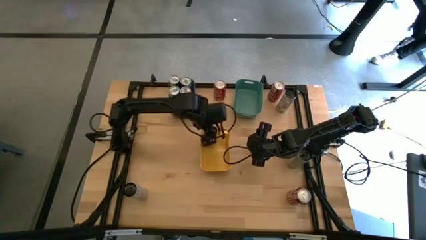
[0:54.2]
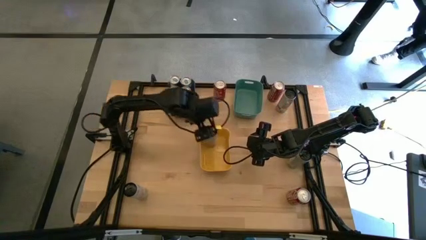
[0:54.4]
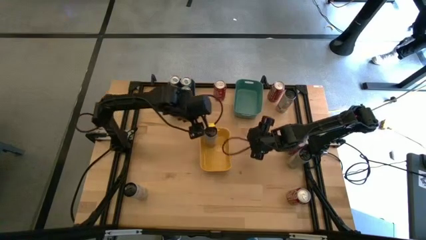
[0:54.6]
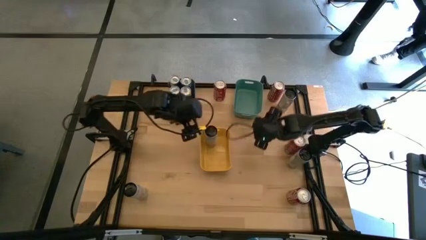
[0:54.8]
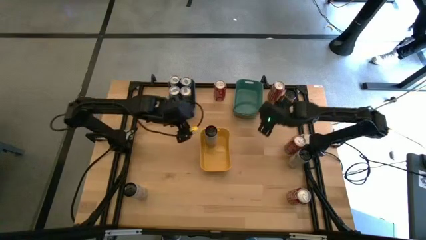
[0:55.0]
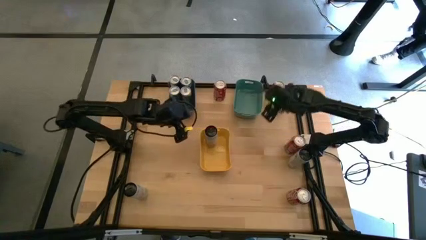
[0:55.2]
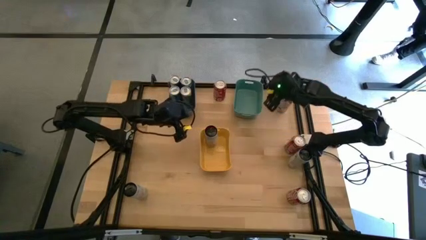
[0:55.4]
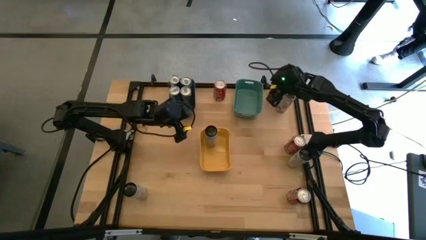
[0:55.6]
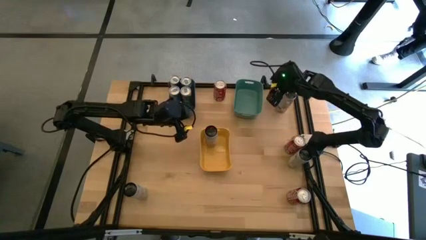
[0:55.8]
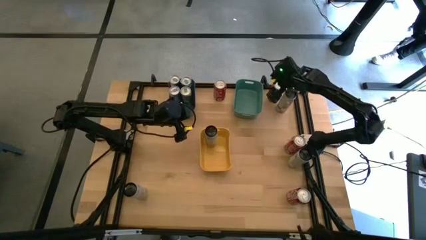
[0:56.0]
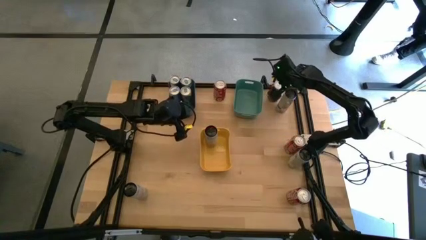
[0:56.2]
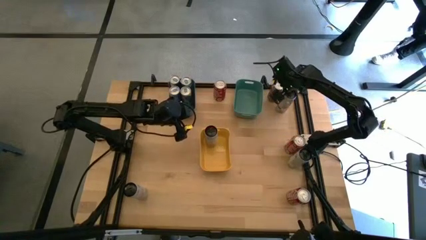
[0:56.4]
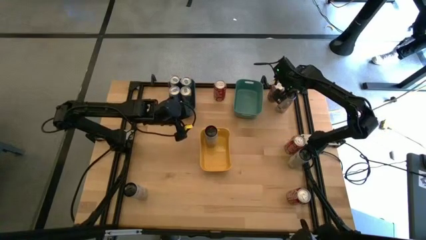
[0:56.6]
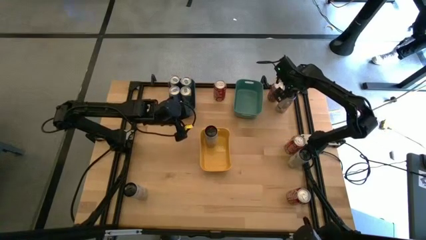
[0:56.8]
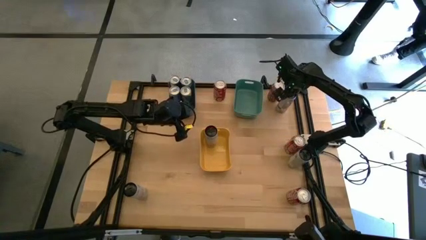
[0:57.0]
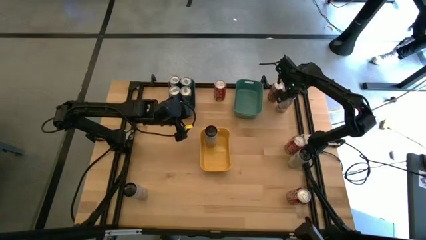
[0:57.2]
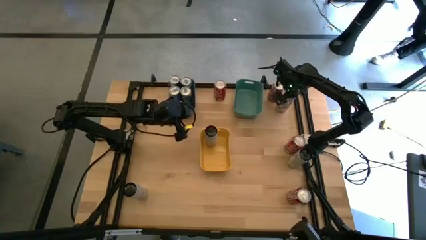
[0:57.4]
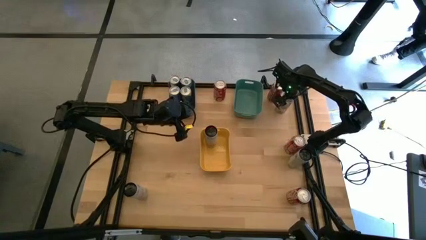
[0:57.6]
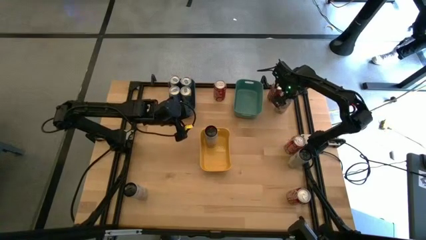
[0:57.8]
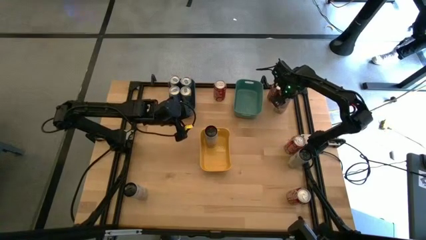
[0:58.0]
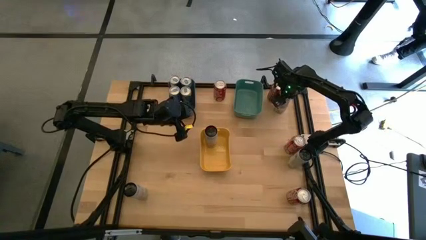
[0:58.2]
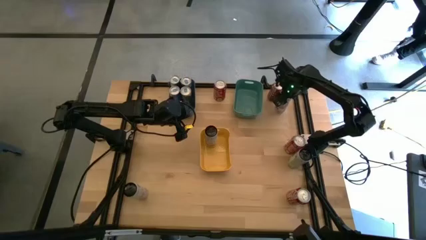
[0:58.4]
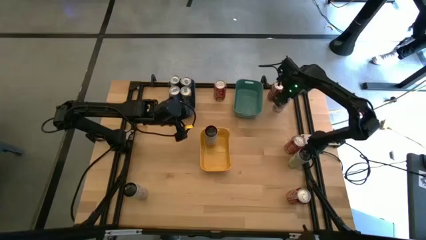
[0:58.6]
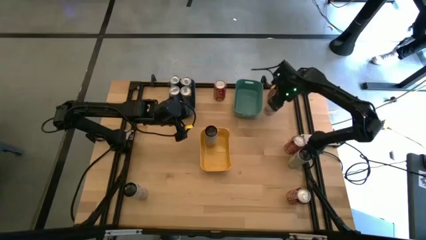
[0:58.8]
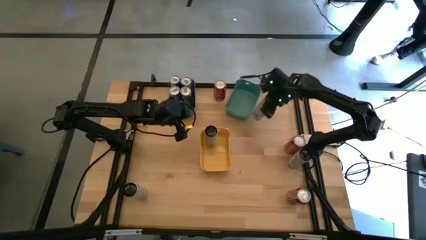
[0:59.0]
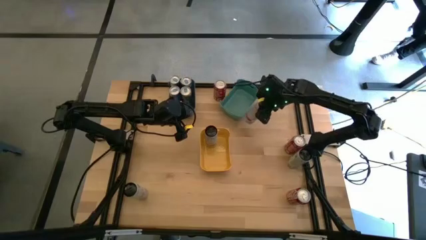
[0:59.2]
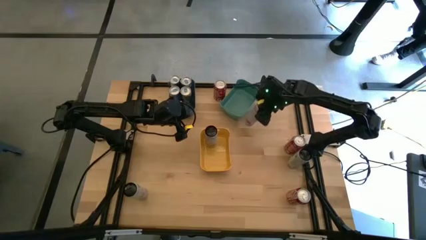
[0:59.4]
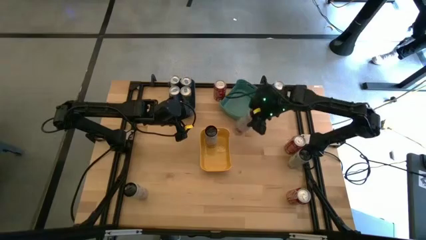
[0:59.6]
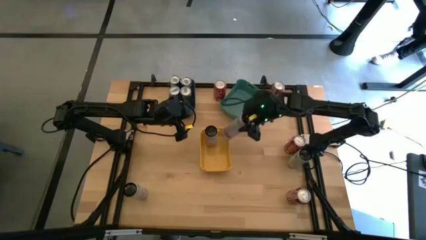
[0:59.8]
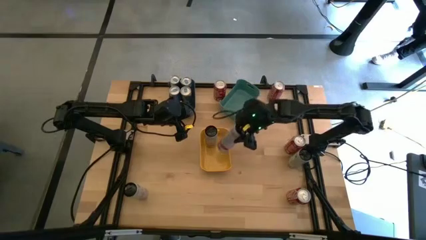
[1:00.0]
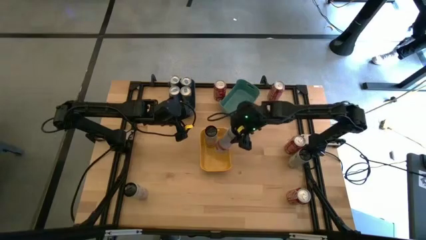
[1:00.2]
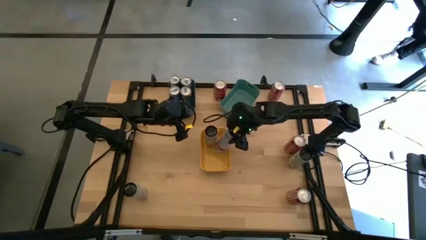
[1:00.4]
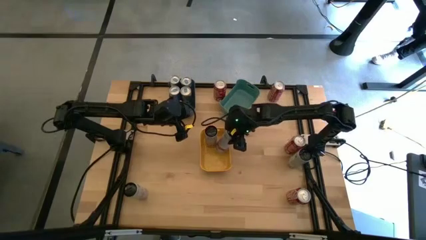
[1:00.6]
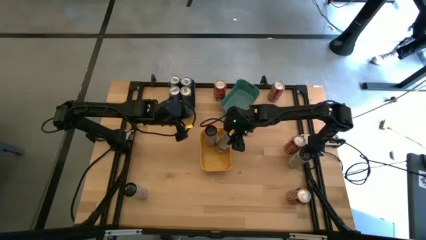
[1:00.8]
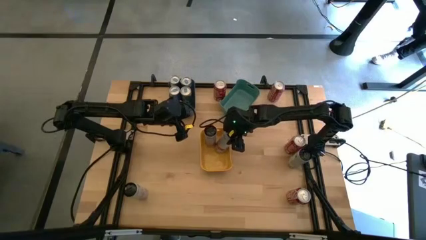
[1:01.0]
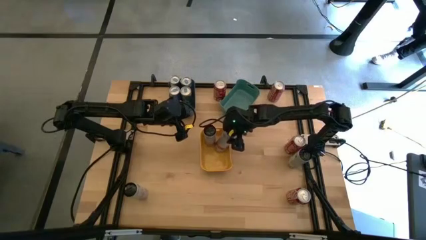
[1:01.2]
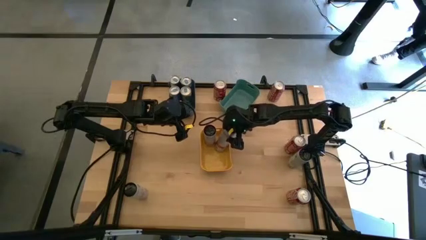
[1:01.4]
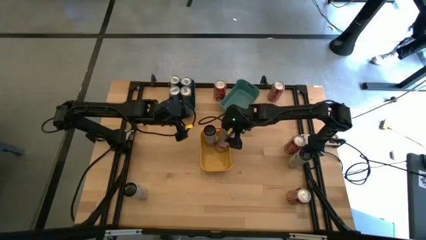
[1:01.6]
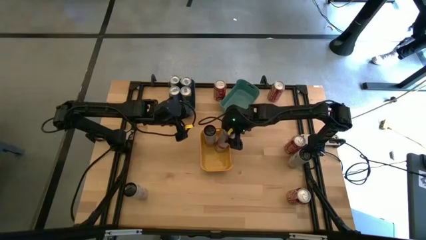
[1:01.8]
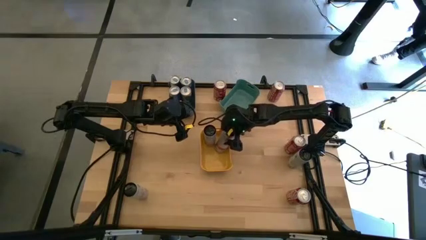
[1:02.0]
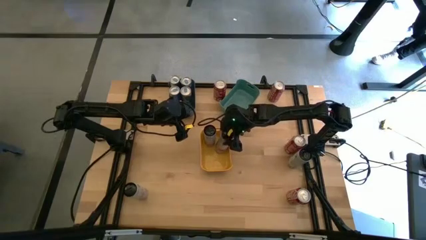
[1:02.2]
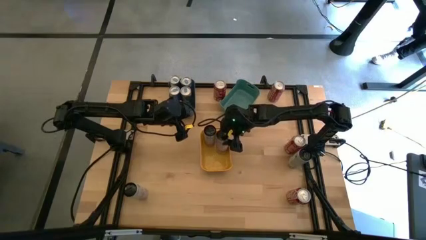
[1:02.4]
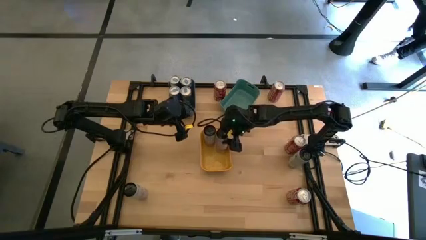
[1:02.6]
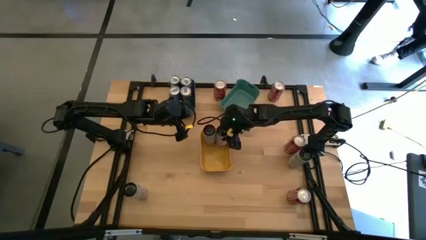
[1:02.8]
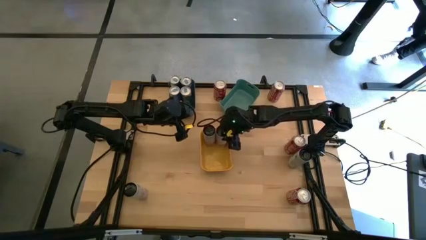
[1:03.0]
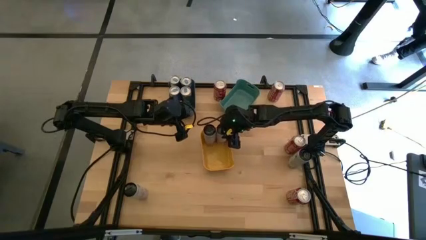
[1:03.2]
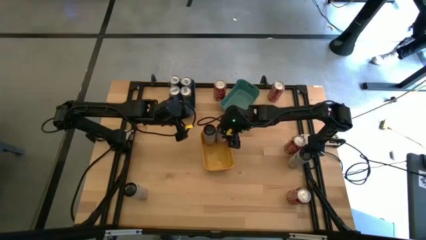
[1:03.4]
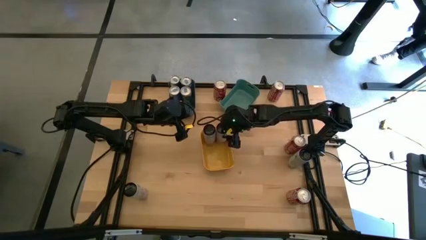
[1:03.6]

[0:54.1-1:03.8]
Task: Sort soda cans
Put the top white pink soda can into the yellow bin

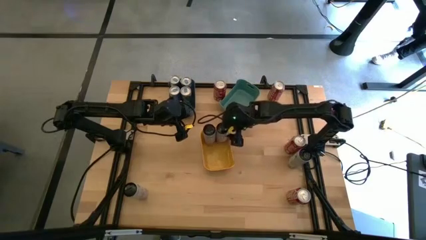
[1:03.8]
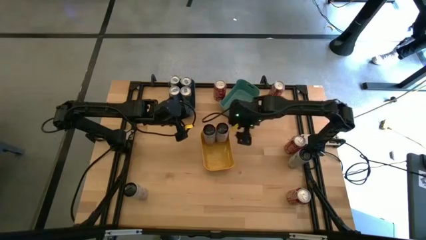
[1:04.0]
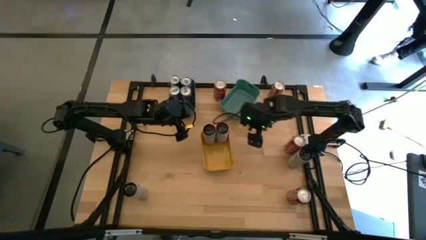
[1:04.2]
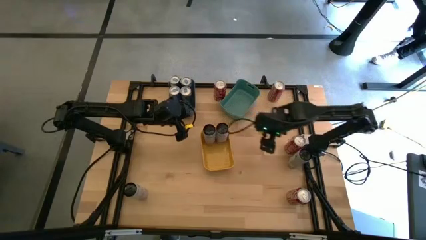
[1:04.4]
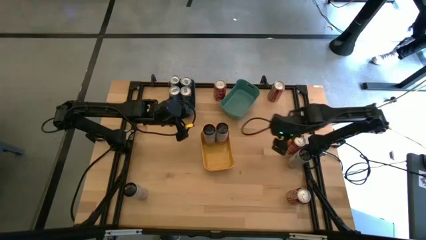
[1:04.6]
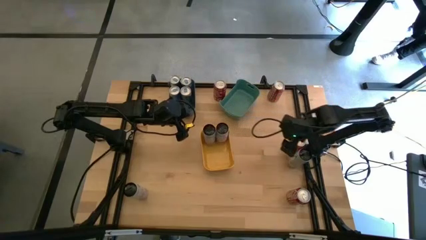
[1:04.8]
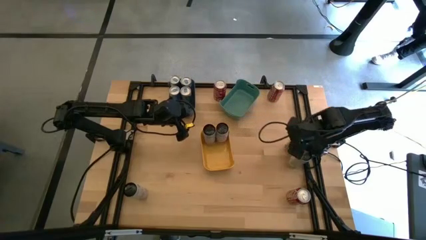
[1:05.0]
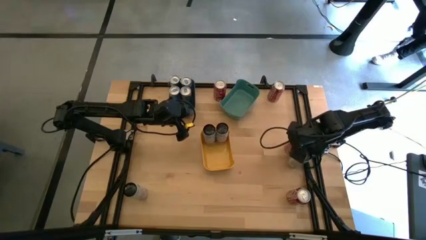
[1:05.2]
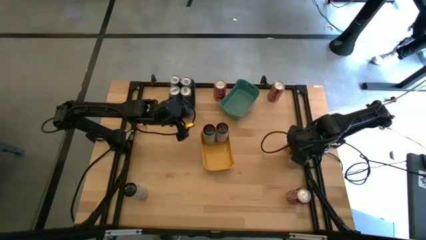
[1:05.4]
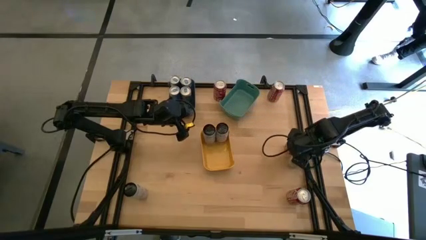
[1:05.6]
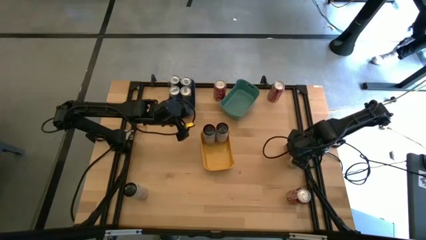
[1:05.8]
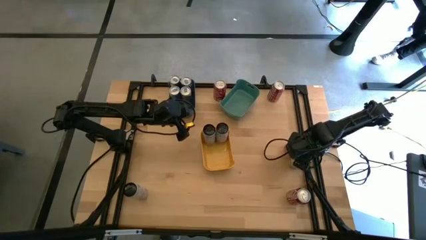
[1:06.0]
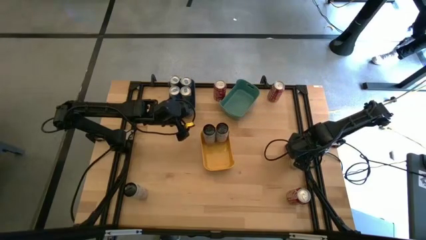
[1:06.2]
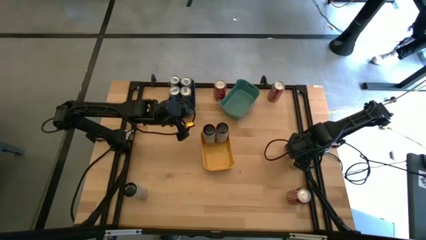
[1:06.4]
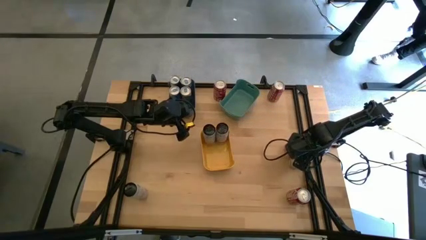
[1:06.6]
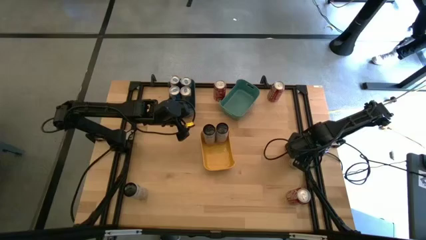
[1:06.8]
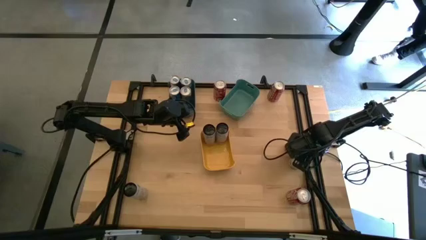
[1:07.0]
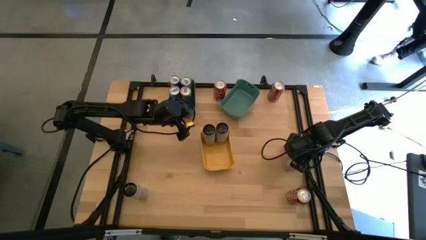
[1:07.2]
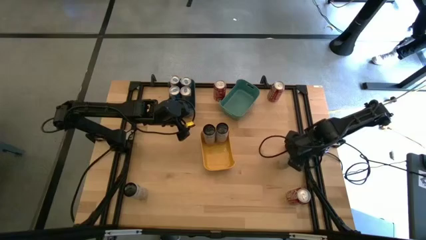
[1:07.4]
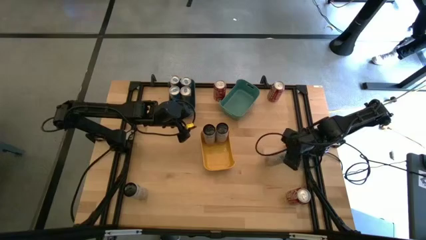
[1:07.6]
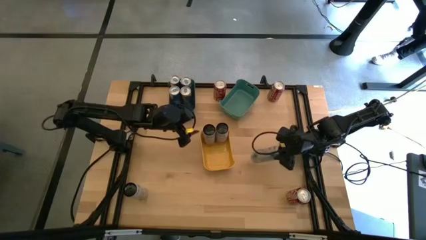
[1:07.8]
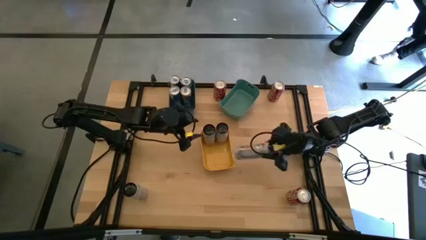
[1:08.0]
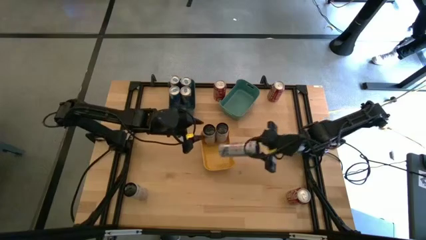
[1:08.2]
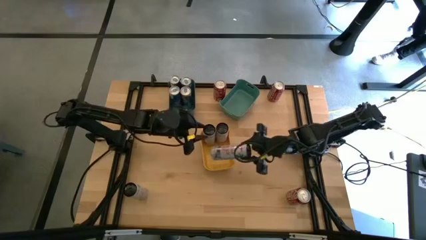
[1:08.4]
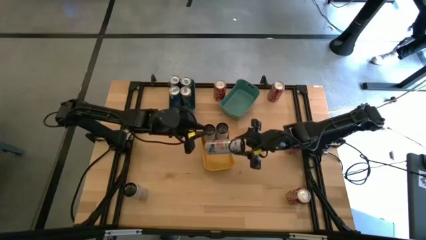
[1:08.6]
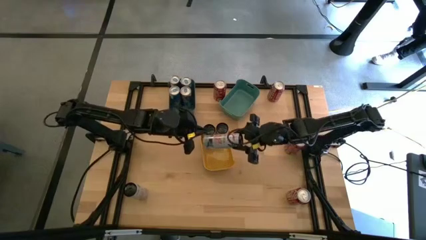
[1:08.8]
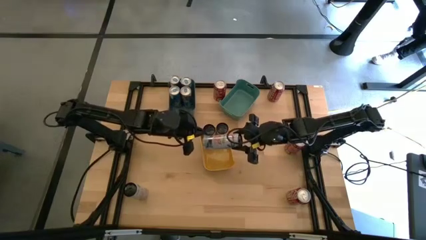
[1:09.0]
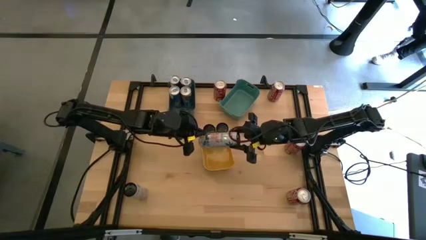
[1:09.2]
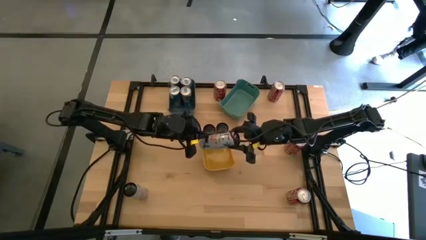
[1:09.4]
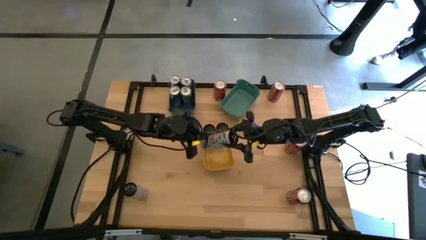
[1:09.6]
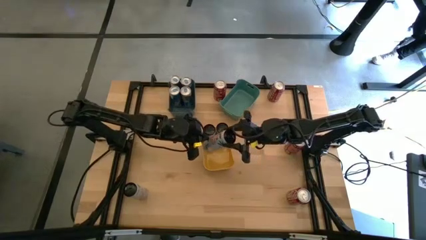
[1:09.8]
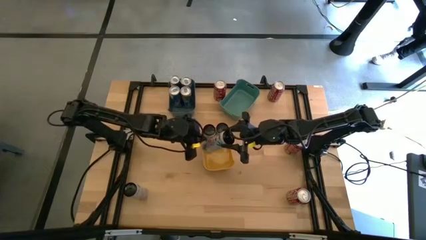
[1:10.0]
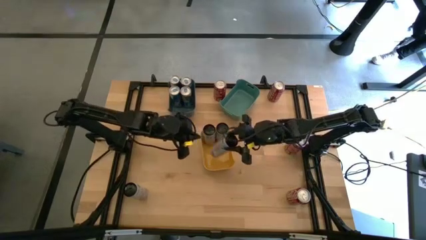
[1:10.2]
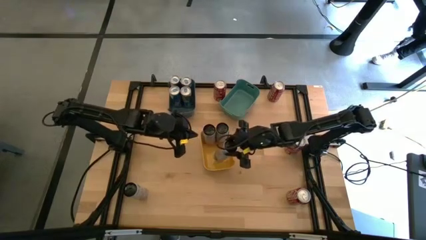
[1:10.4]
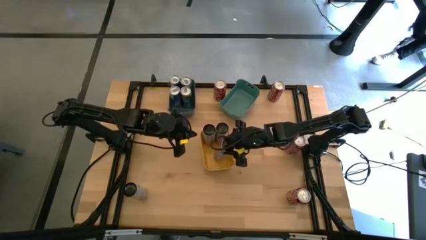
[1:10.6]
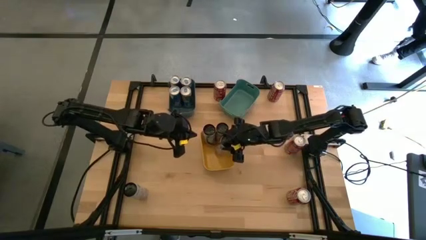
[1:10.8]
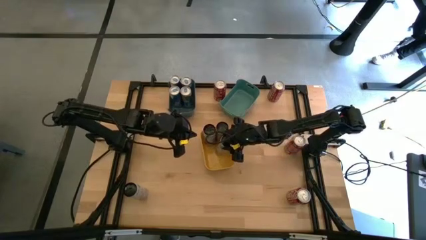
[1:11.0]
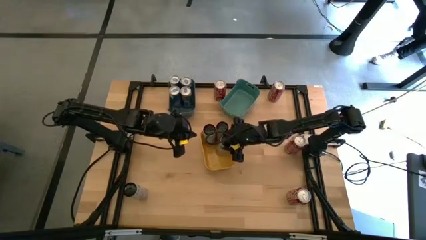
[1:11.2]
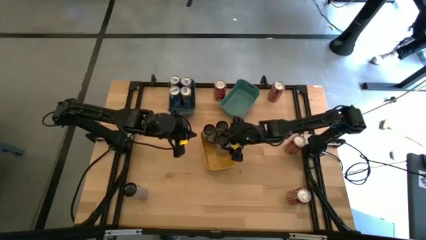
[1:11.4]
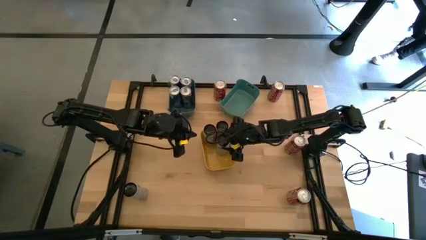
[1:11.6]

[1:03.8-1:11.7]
Put the right white pink soda can into the yellow bin
